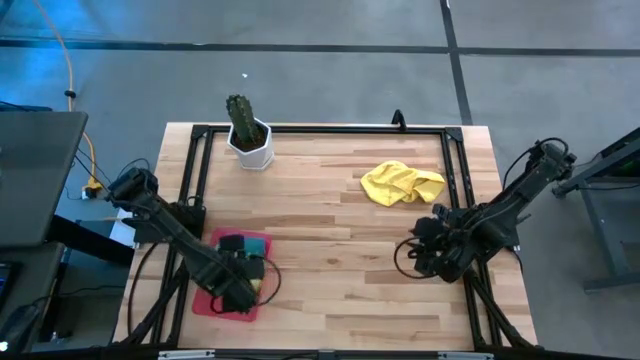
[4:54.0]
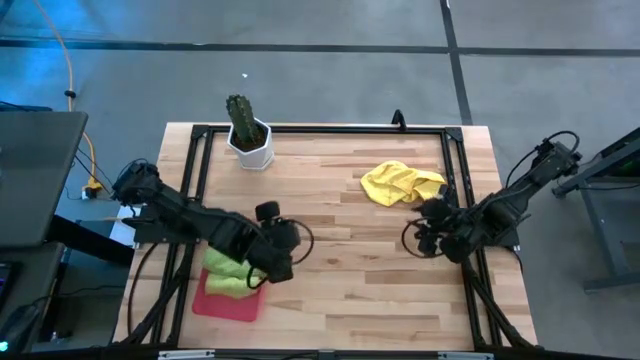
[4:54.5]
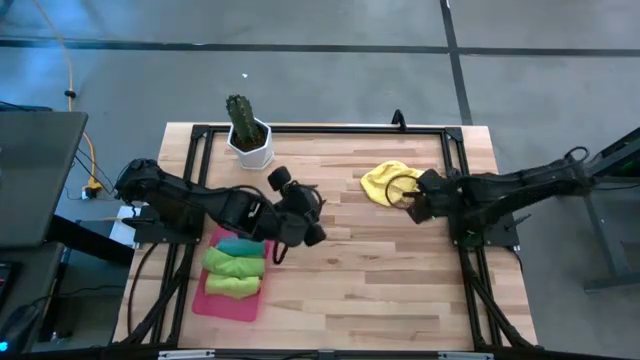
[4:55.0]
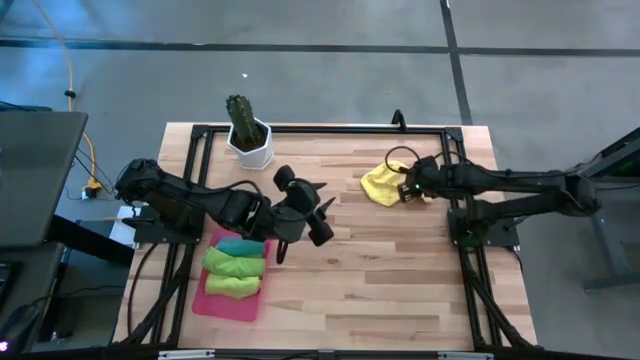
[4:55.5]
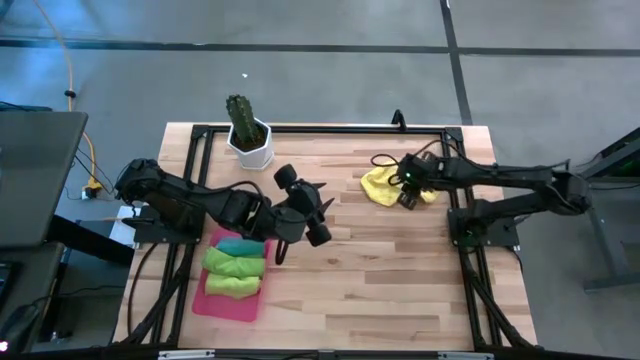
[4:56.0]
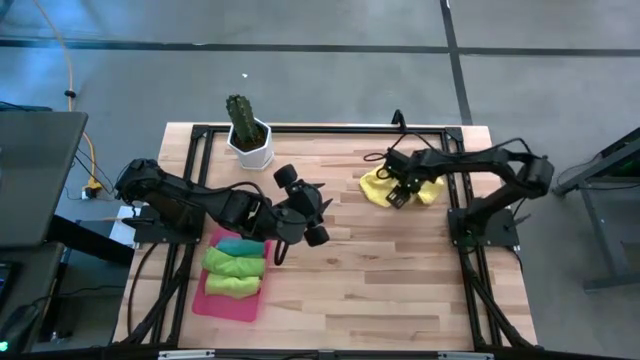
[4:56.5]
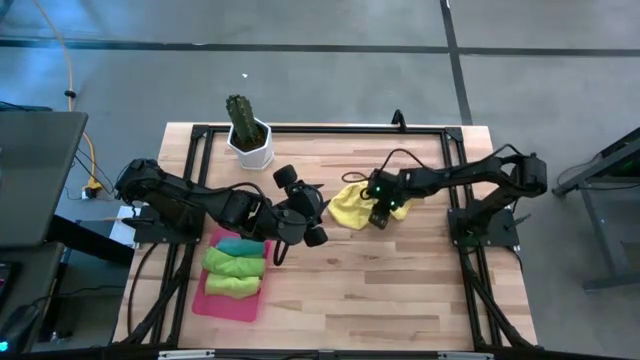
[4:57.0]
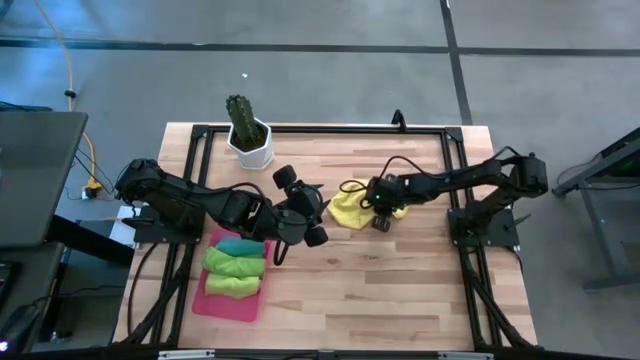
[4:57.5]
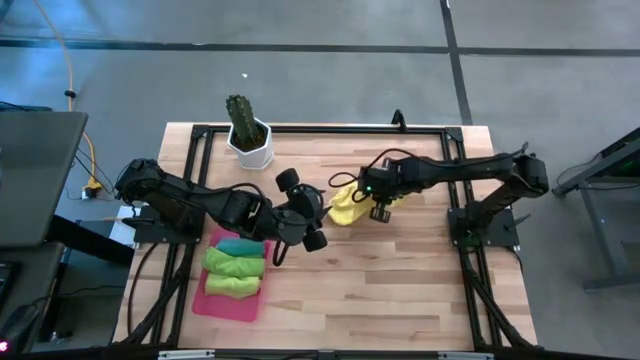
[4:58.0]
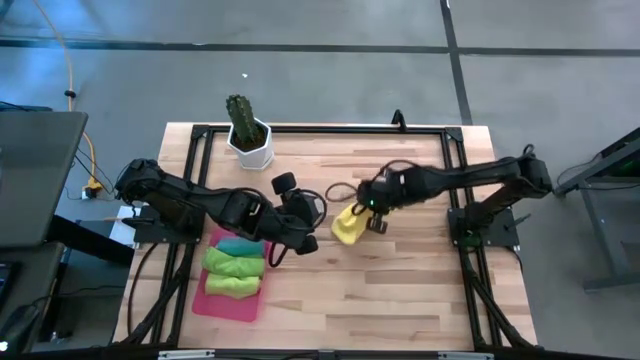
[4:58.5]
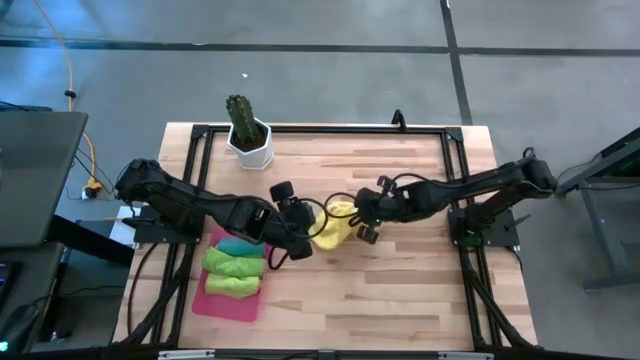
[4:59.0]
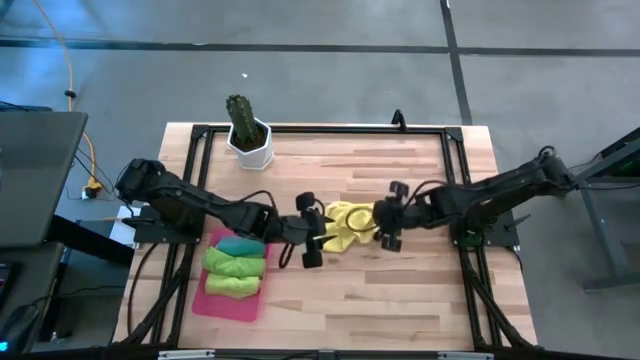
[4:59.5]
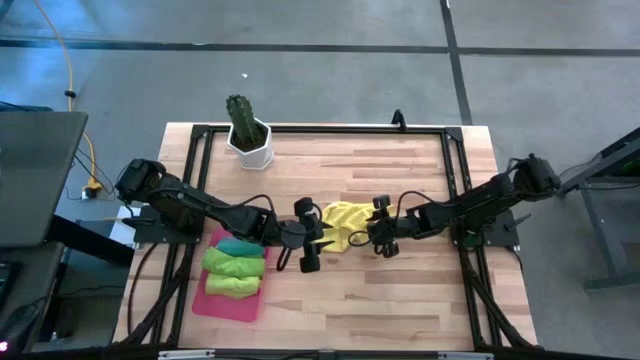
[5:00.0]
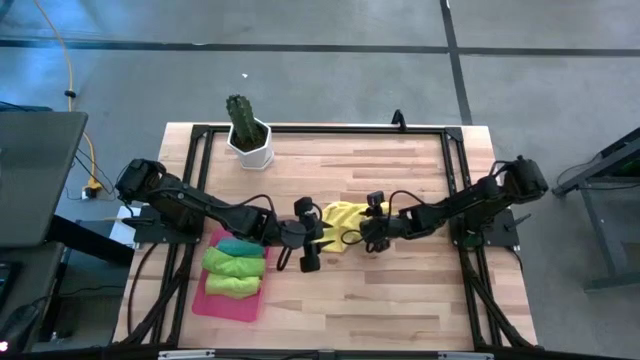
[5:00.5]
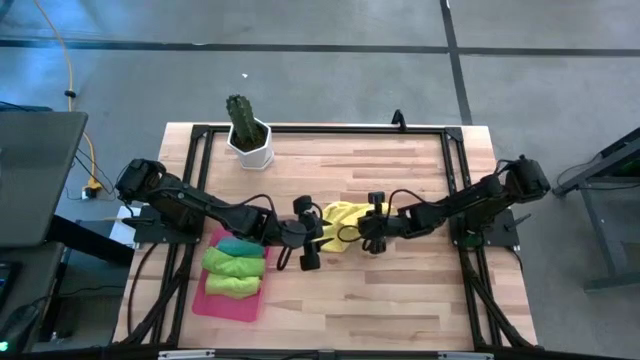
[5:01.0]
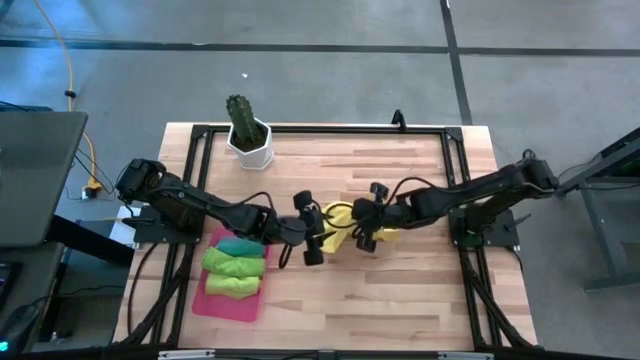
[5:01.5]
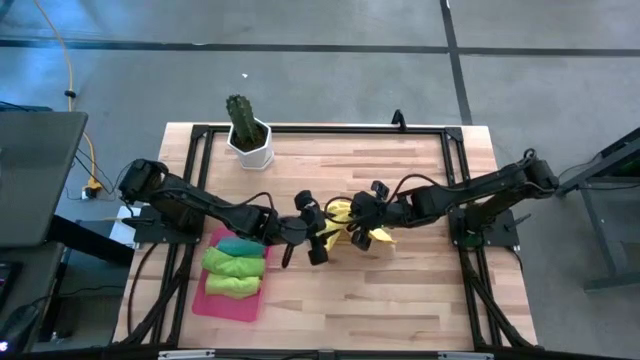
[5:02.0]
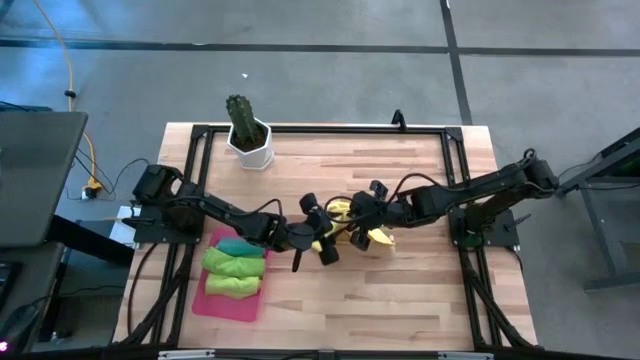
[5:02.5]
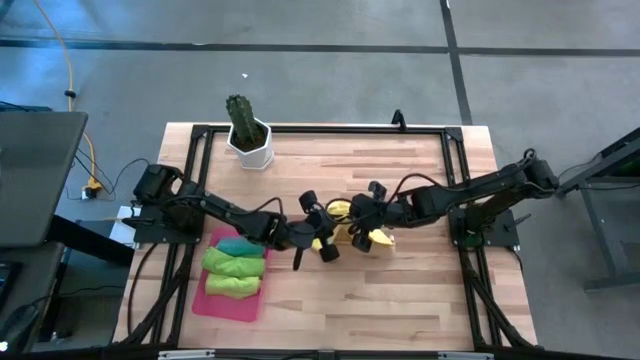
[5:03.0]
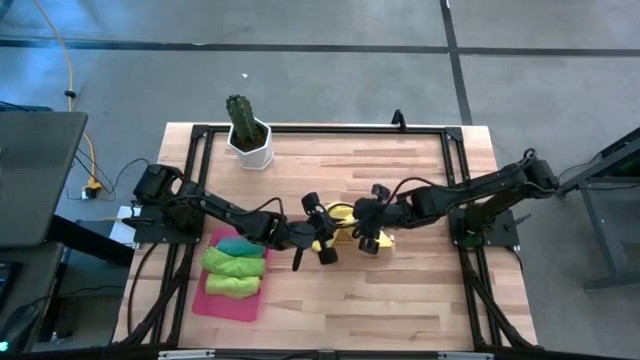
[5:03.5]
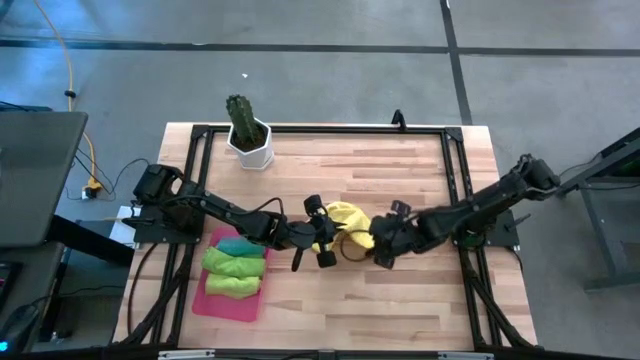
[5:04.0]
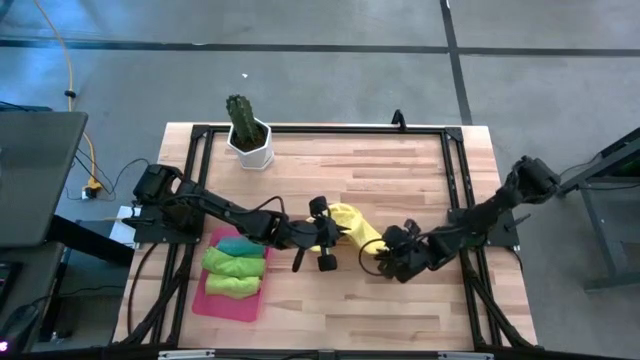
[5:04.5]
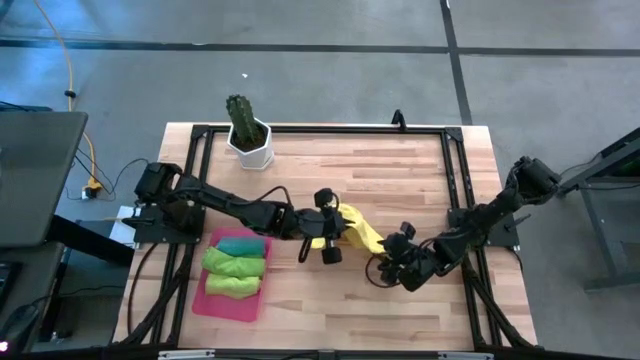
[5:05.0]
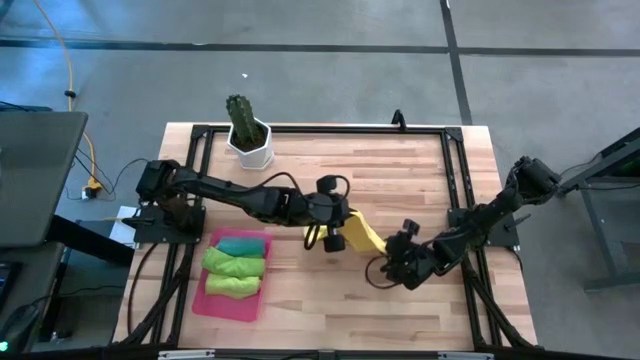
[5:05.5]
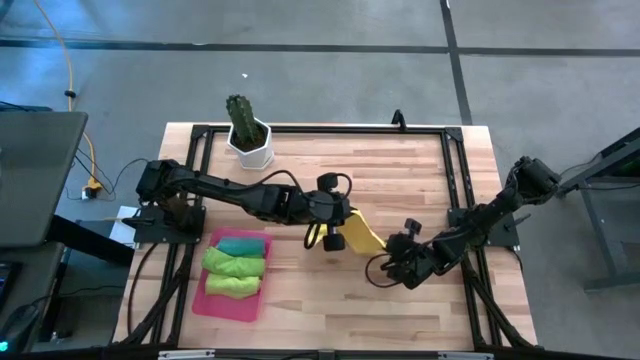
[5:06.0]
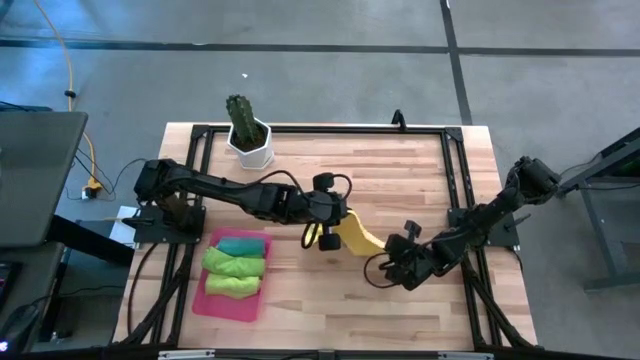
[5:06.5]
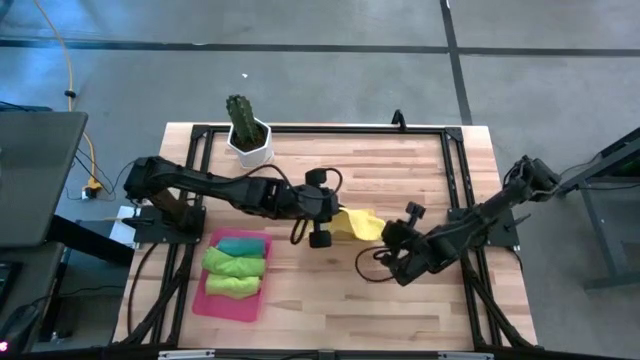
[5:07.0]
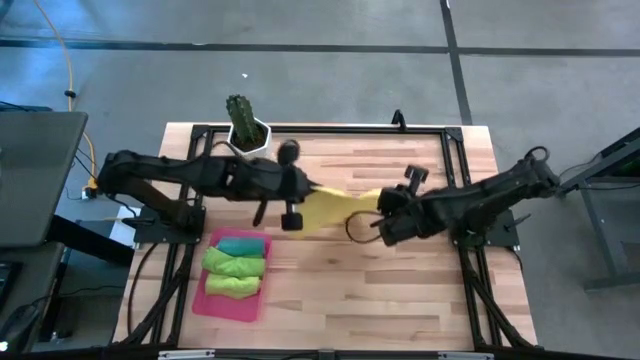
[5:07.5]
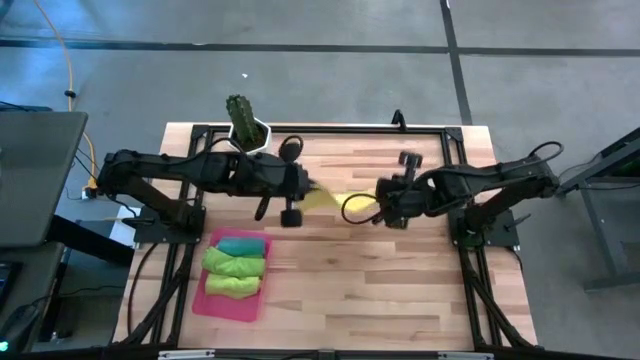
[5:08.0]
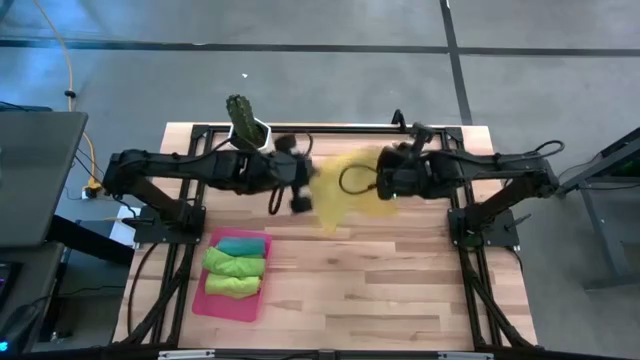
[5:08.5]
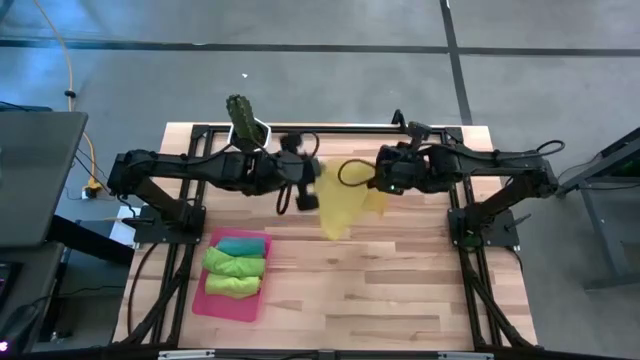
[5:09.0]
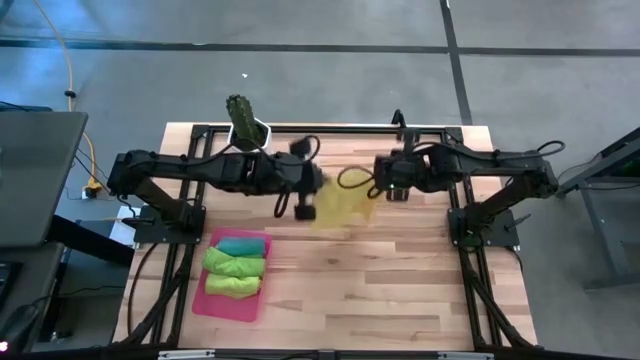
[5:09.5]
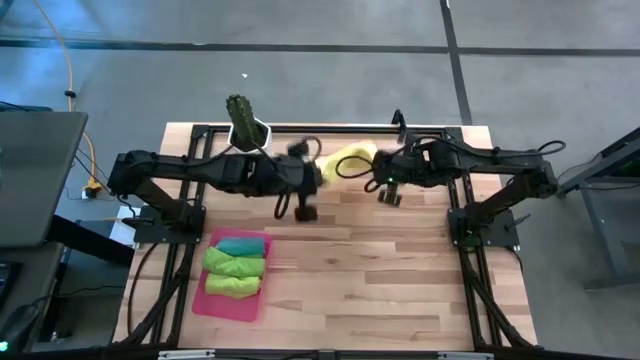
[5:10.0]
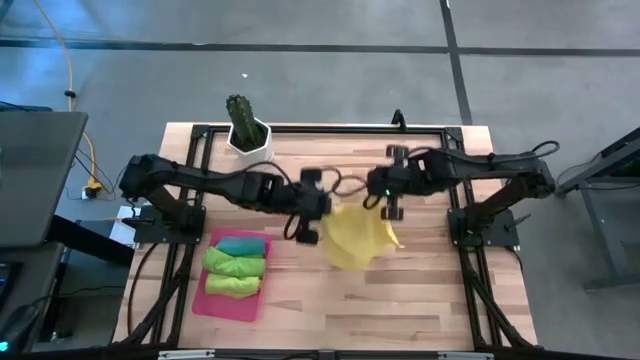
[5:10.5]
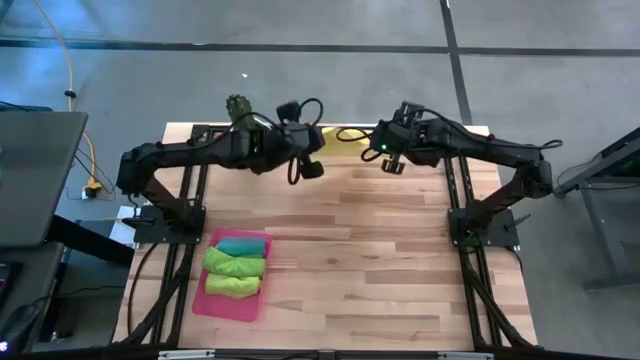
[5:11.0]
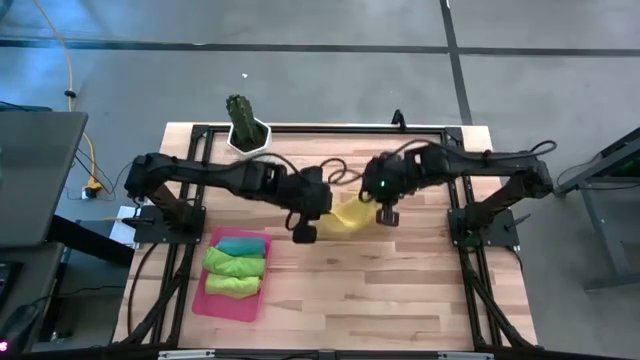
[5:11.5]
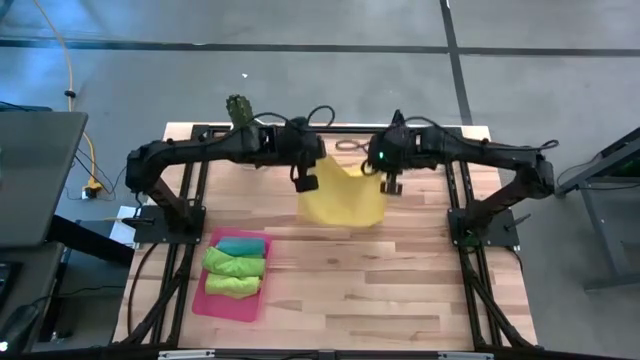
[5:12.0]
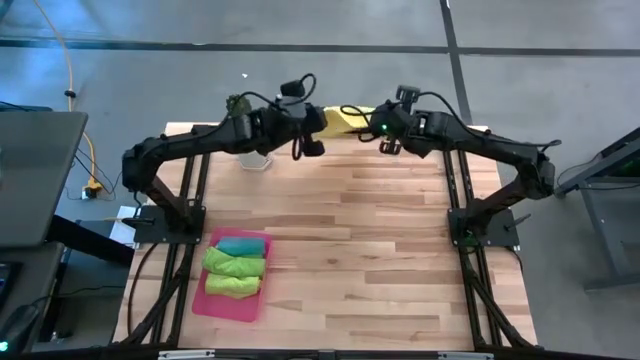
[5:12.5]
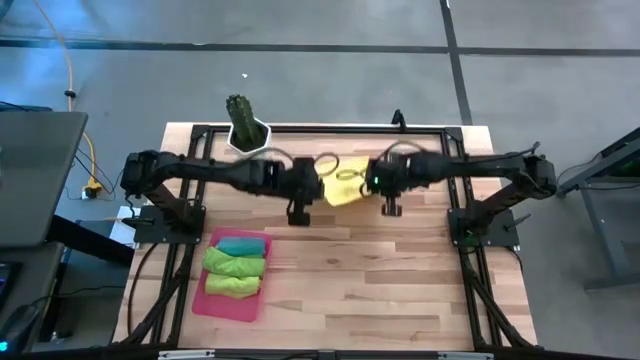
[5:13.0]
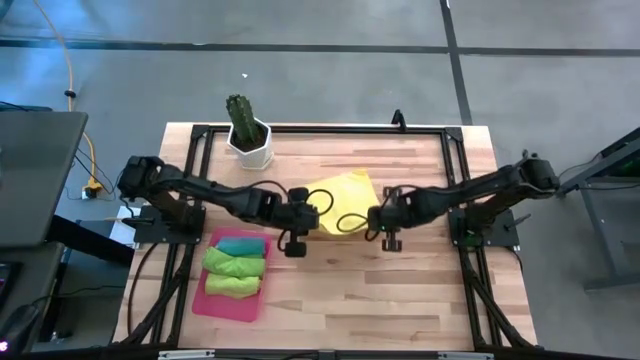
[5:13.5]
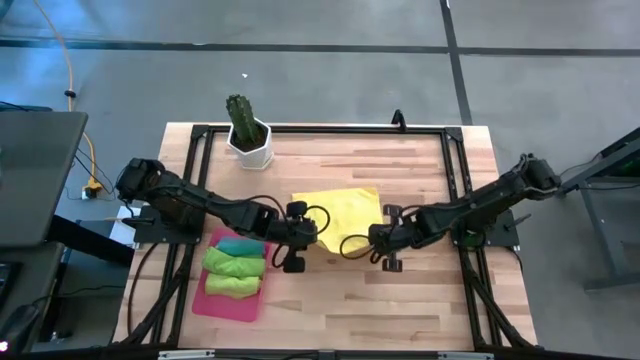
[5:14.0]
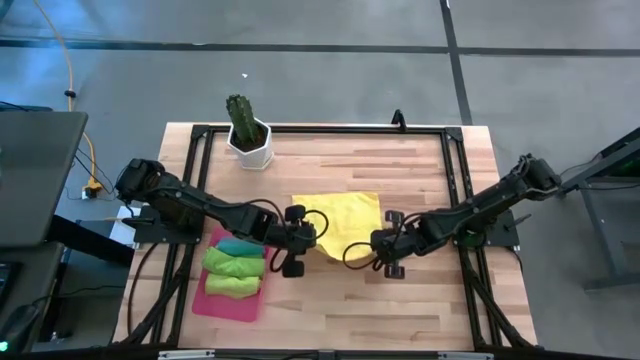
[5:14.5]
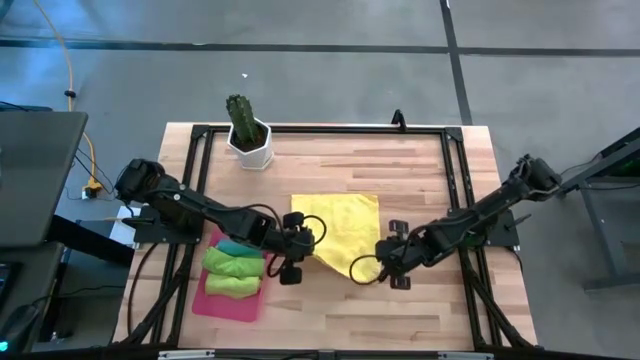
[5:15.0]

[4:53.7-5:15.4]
Task: Roll microfiber towels into tight, uniform cylinder then place into a basket
Roll the yellow towel
